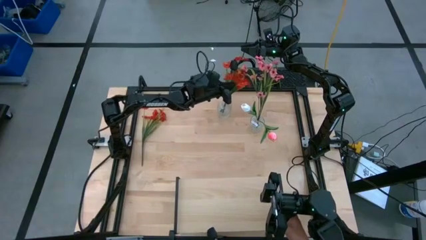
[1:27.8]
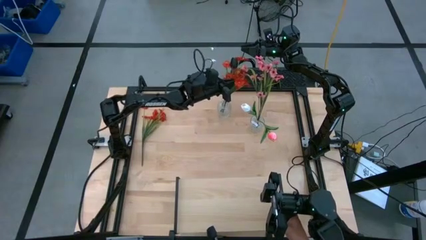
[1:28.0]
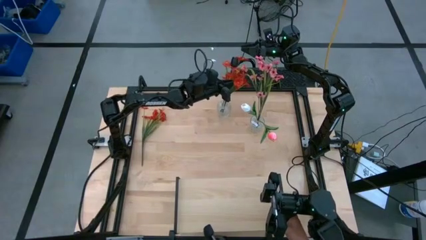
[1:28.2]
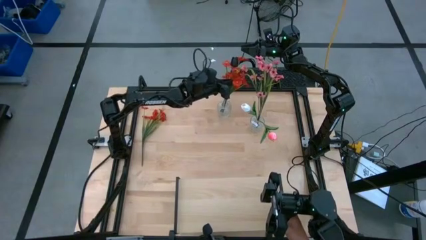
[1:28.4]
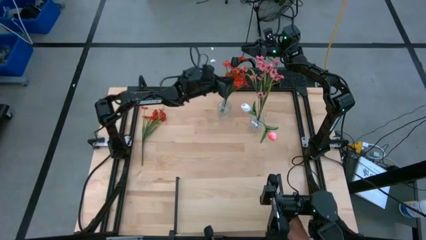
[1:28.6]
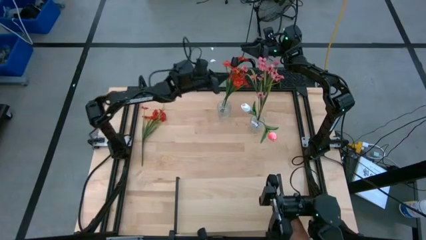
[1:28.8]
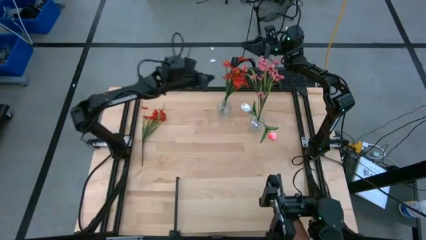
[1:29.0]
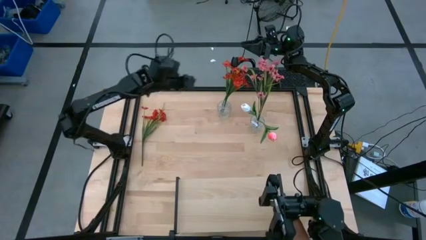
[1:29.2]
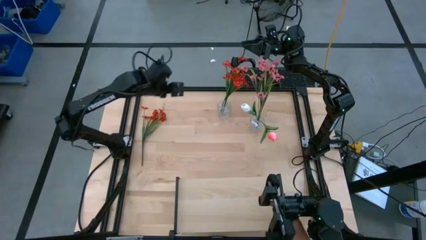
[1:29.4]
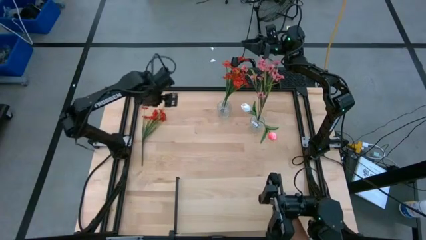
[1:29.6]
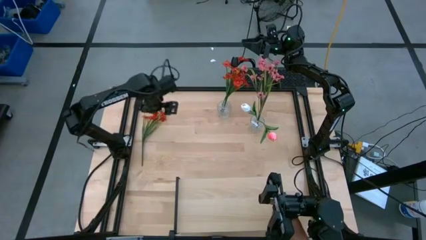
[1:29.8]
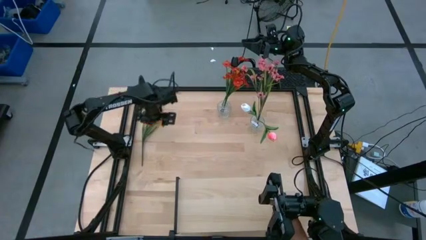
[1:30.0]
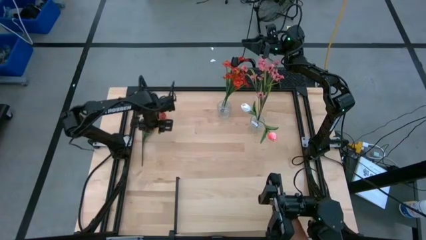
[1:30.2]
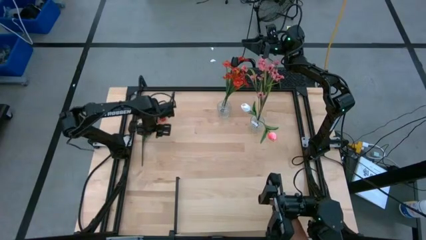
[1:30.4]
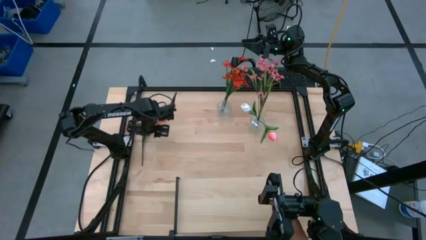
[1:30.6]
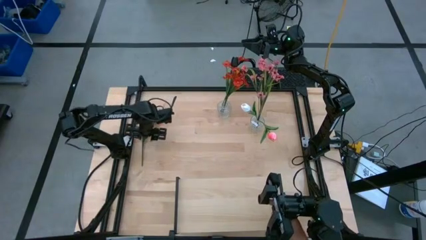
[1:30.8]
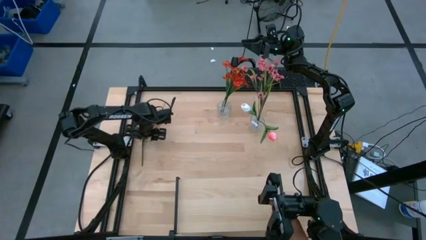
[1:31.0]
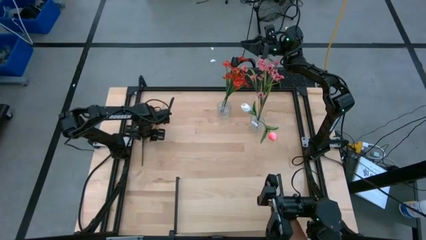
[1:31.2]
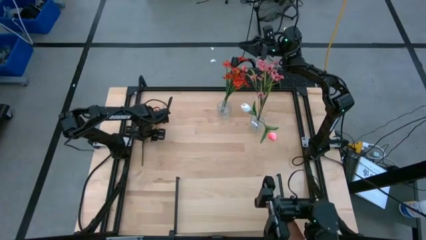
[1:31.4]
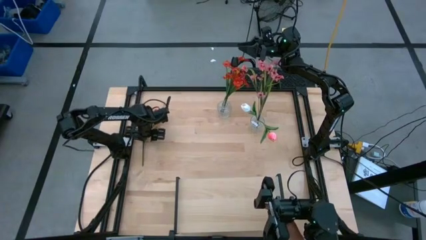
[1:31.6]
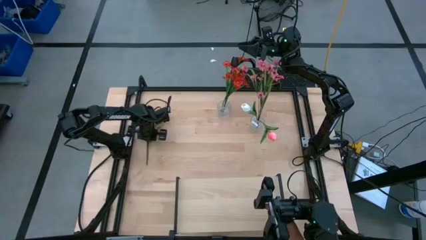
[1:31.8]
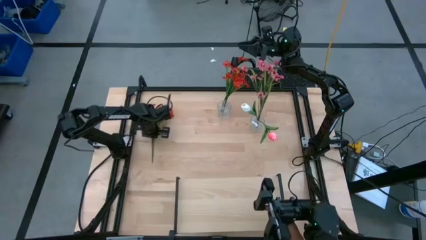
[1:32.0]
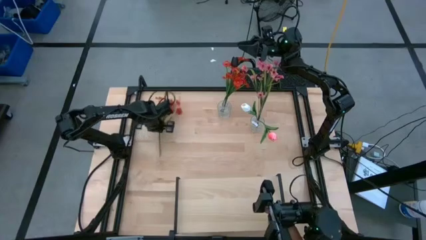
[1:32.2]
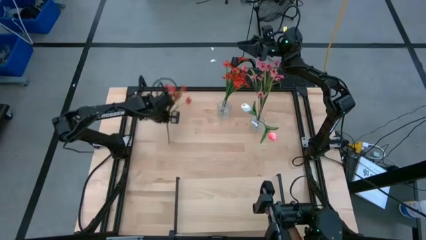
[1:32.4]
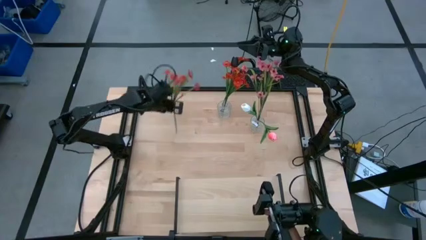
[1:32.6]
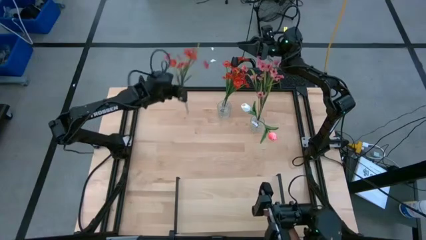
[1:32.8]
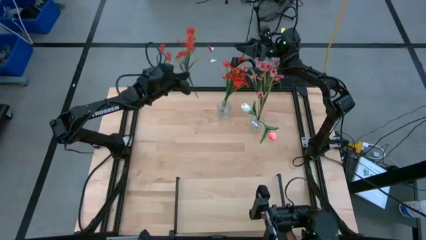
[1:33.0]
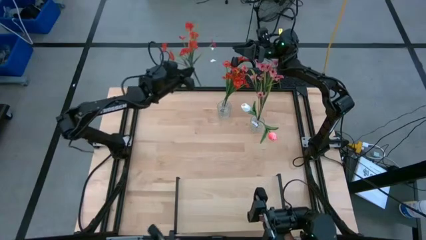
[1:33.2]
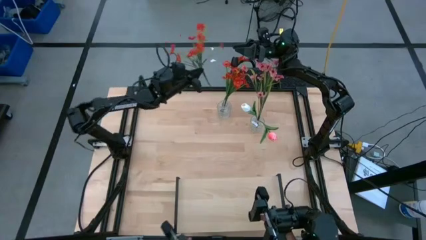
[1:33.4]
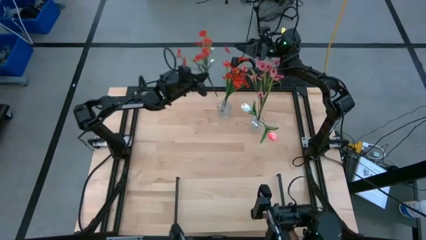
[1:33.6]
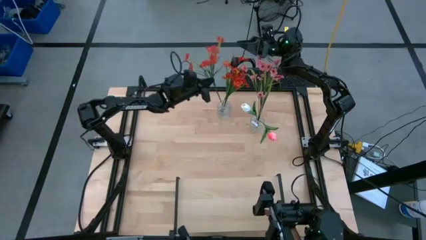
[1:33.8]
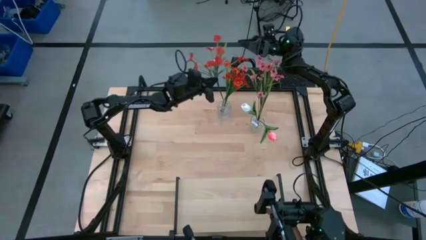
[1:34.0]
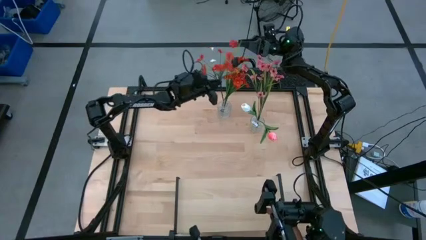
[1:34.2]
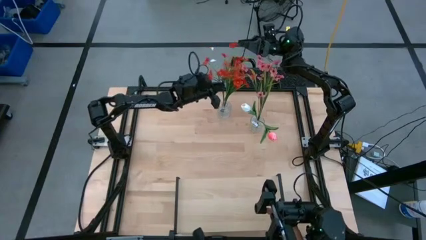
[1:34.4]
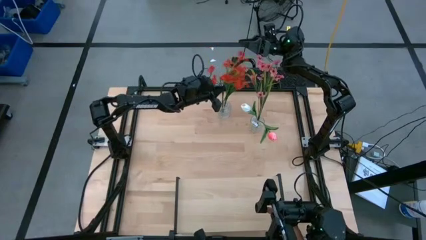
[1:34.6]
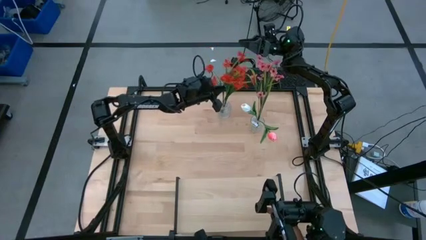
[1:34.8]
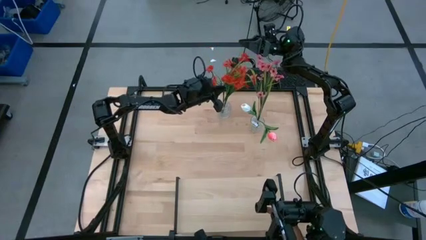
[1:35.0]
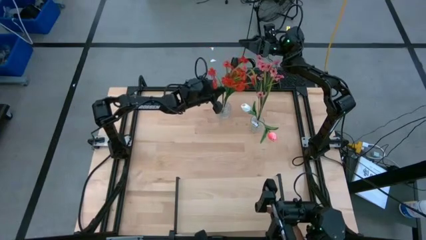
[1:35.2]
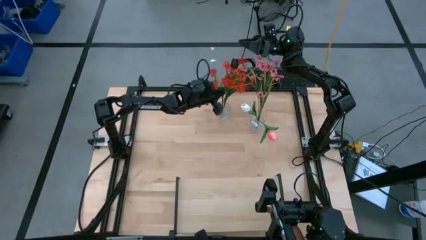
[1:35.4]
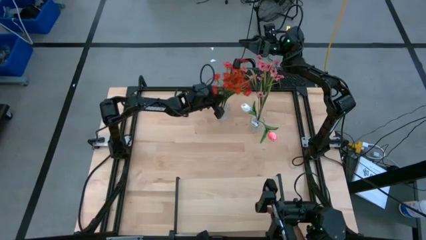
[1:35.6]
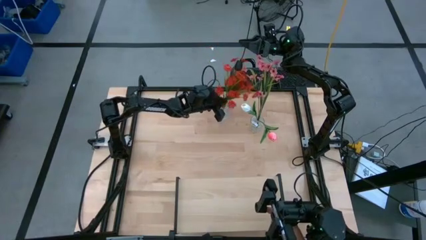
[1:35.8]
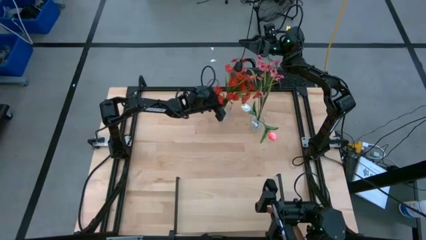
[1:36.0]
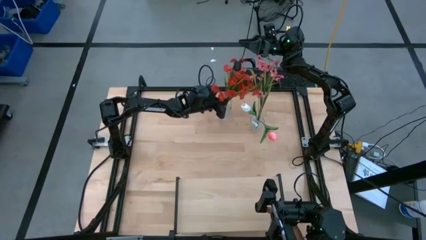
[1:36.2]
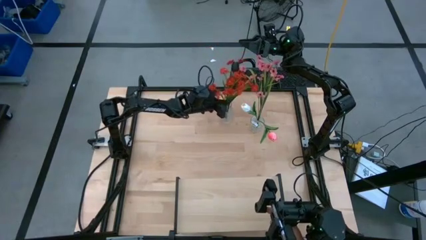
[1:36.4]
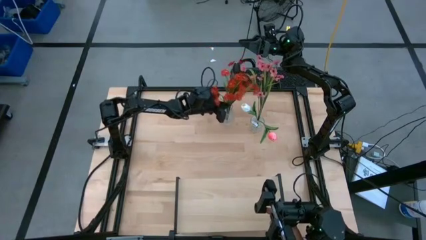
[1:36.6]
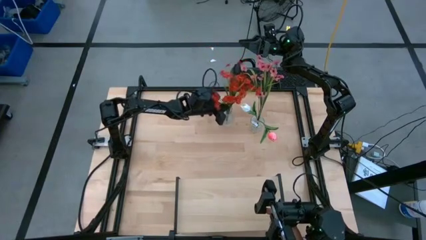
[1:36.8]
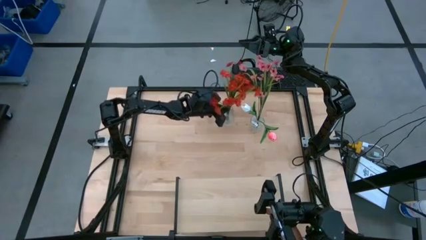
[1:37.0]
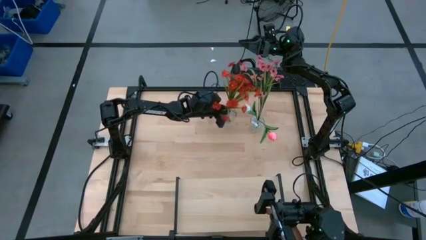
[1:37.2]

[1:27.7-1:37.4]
Task: Pick and place flowers into a vace then onto a shelf
Put the red flowers into the left transparent vase
